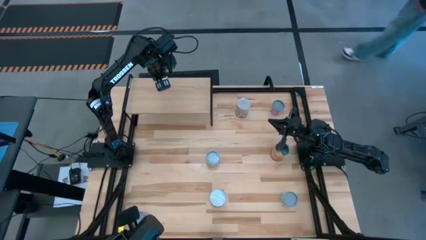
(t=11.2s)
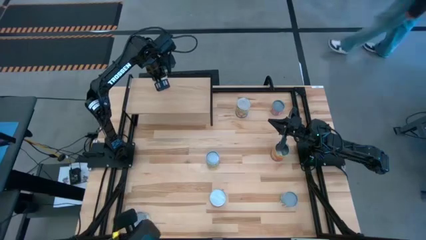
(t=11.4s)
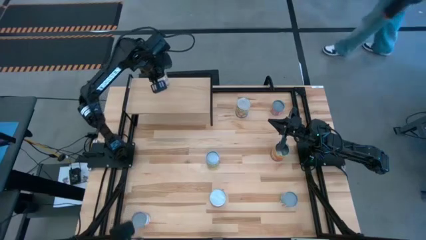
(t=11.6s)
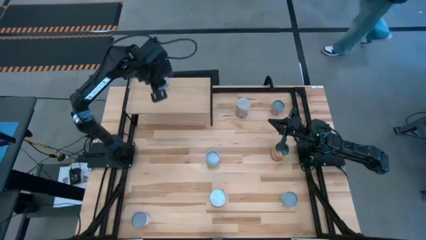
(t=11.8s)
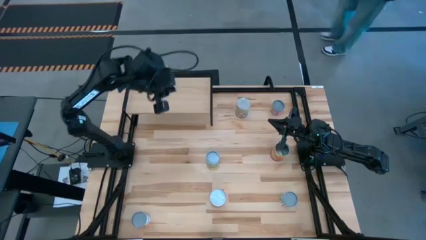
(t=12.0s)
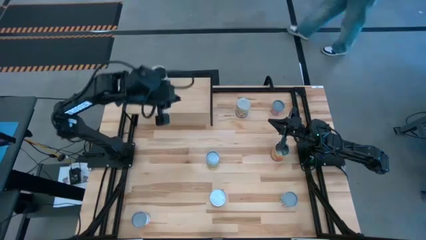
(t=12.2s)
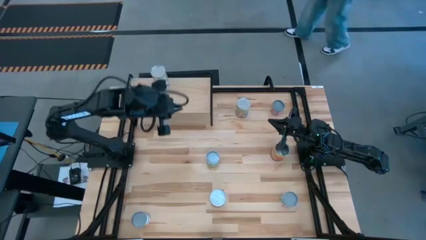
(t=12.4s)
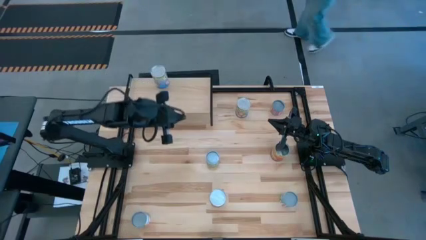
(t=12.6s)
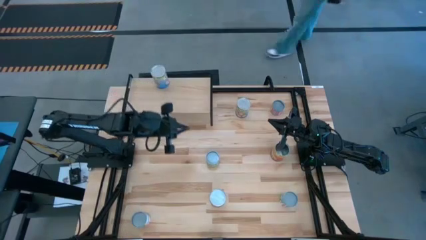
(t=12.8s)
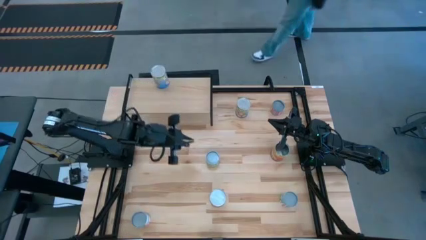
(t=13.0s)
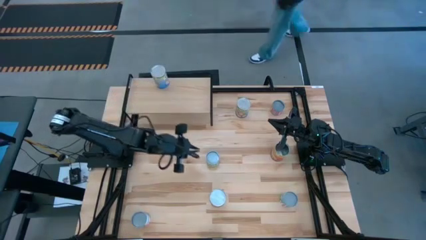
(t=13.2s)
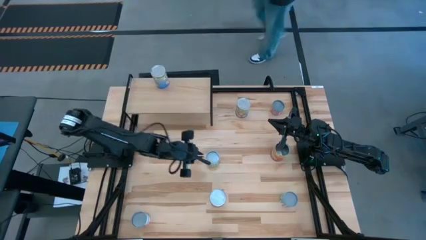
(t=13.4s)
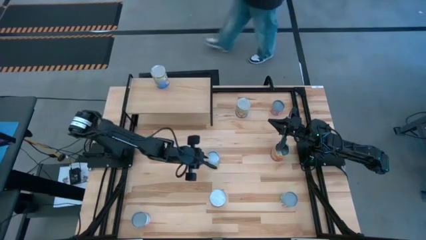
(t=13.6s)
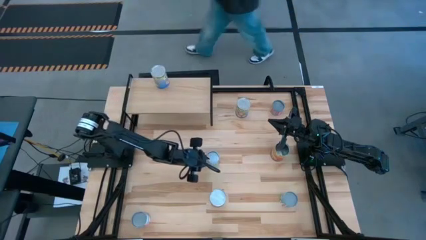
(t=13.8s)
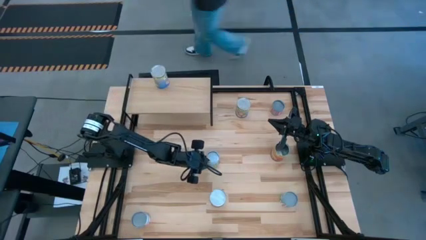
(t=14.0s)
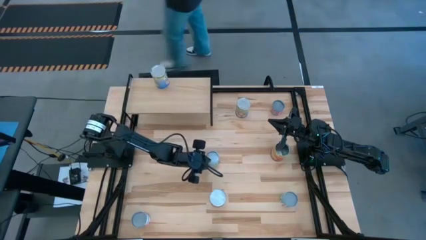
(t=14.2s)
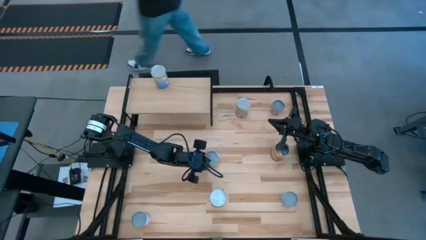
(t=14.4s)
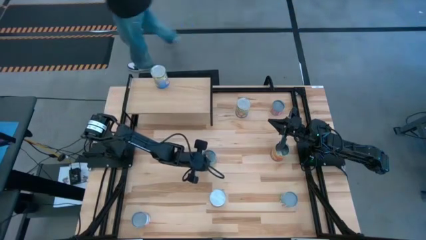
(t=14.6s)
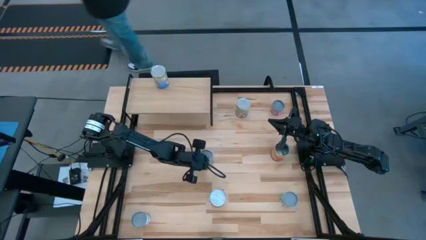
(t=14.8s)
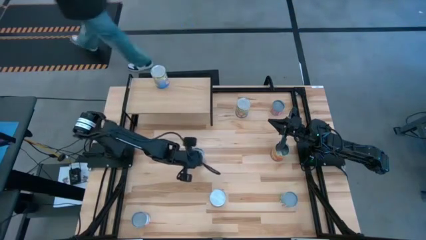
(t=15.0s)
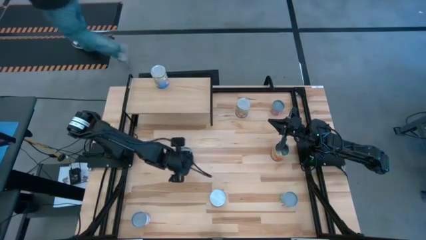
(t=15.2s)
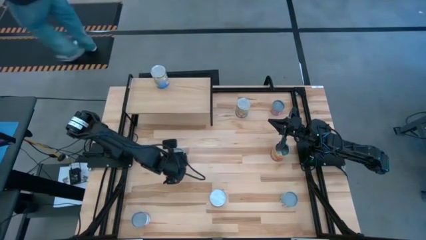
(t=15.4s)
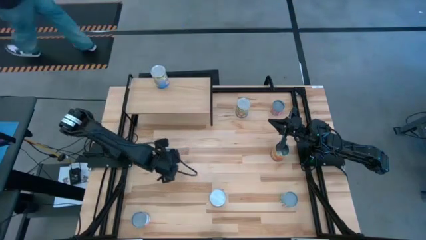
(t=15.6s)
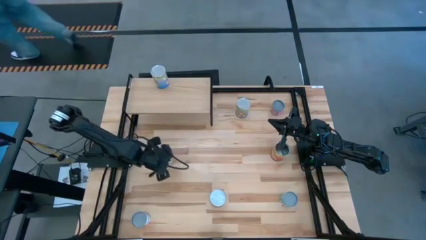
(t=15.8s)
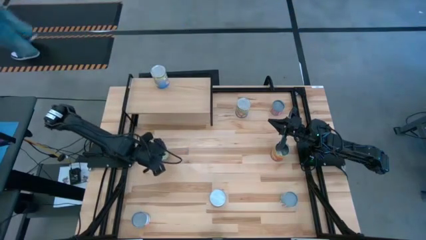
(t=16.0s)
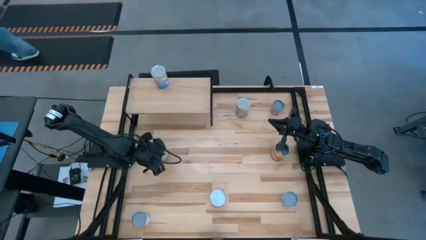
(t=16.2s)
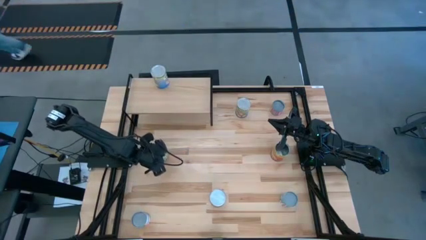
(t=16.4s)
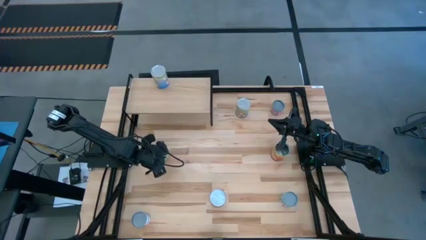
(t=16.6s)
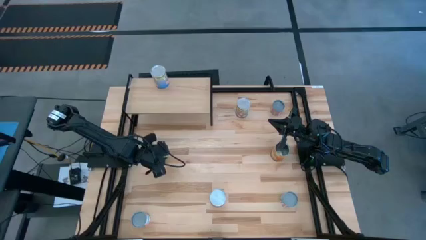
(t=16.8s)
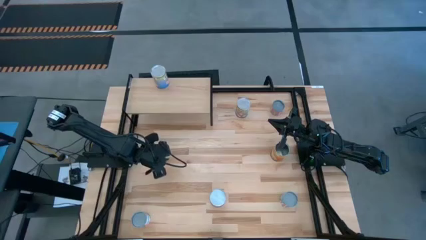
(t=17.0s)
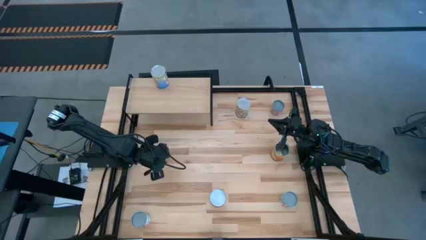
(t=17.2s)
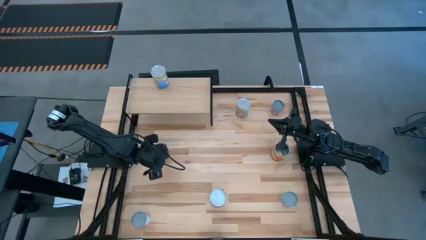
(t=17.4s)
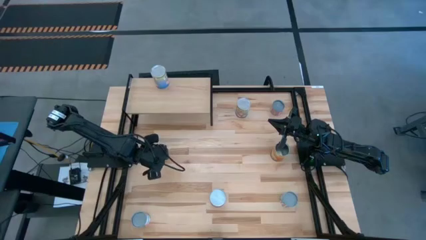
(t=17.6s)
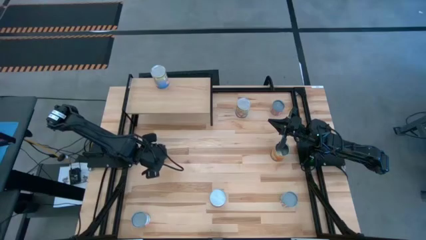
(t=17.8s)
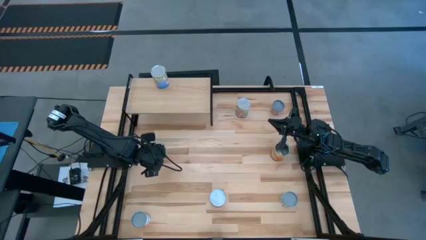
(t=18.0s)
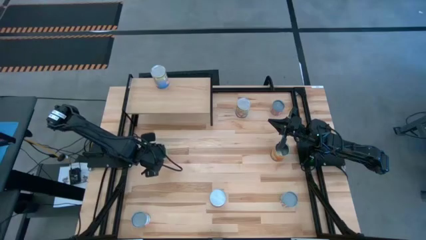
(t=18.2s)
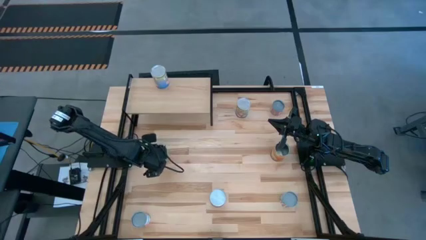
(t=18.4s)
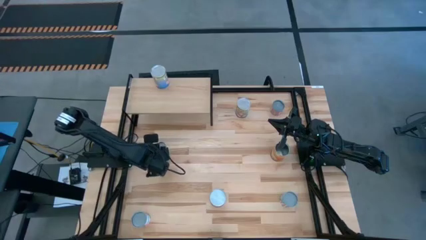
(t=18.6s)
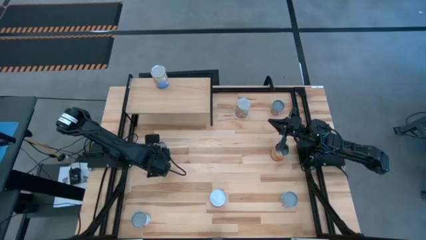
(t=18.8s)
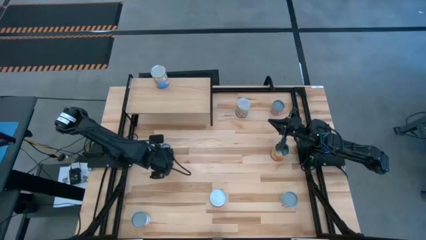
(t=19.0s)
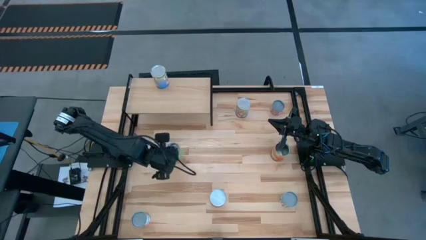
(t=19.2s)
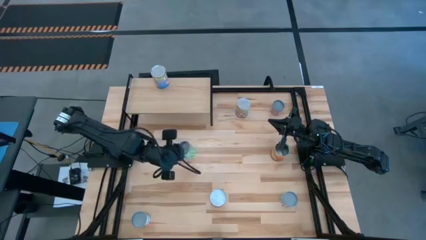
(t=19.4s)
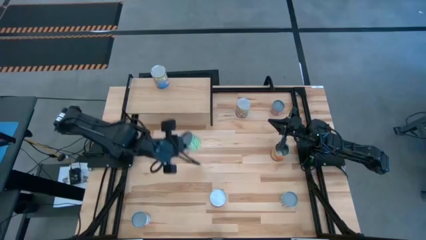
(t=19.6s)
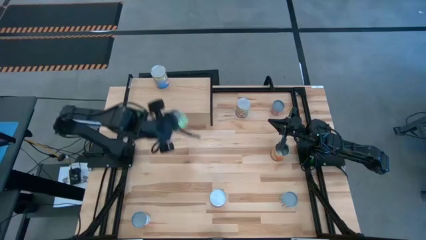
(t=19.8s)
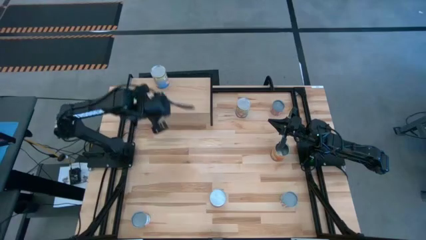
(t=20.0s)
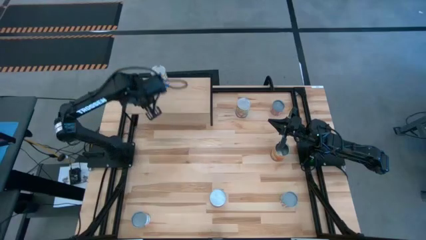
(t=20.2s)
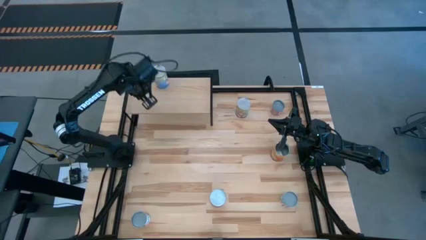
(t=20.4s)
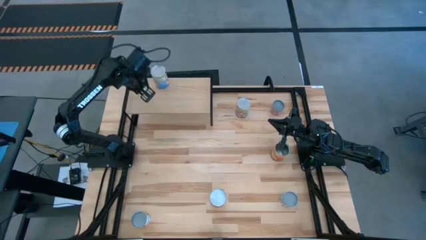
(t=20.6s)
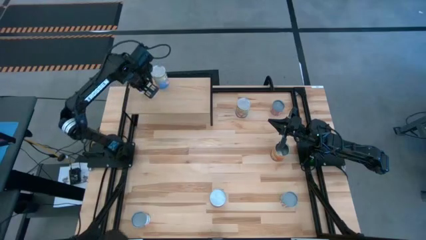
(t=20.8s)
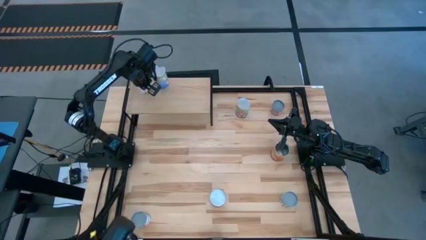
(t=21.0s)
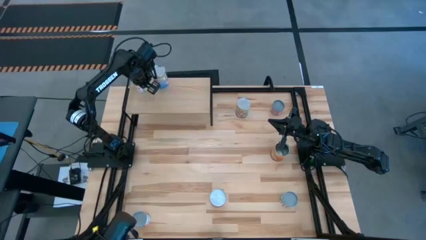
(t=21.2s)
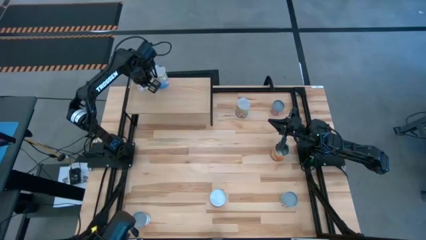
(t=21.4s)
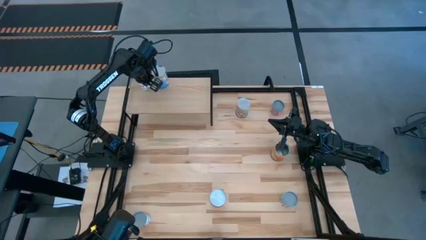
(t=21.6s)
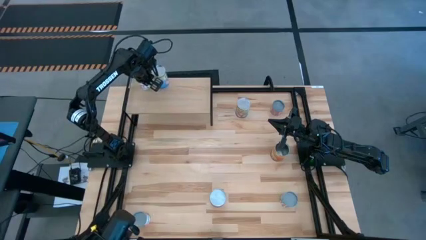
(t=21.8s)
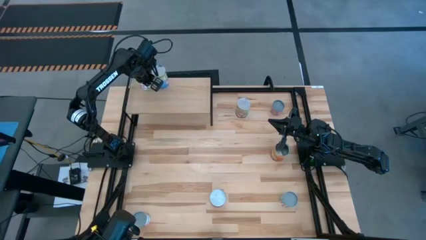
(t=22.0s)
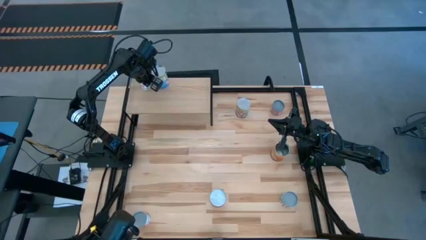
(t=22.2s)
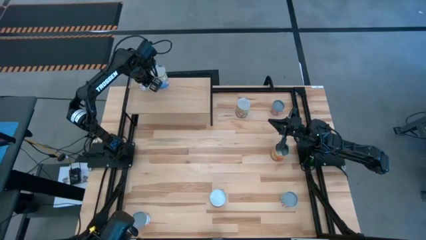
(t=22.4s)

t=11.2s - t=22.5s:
Task: Pick and place cans onto a shelf
Put the light green can on the shelf
